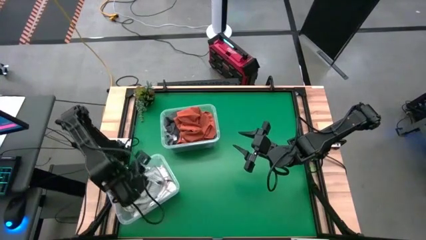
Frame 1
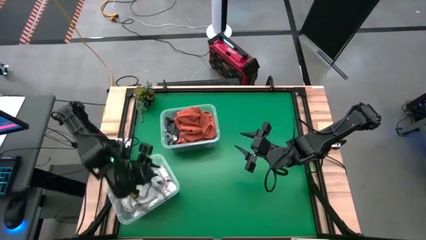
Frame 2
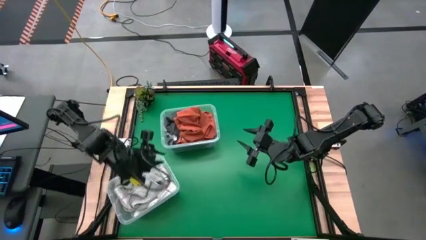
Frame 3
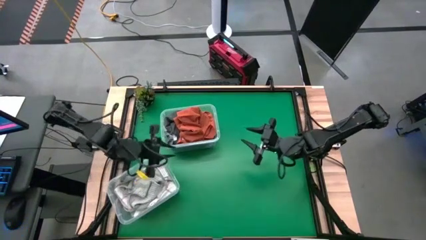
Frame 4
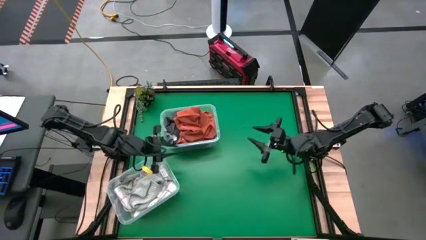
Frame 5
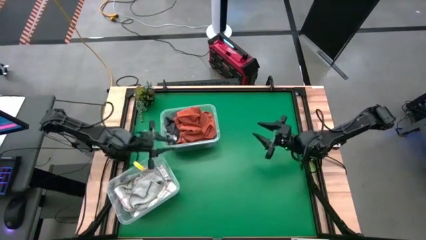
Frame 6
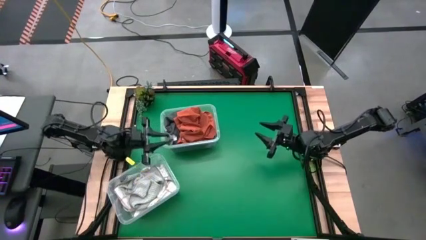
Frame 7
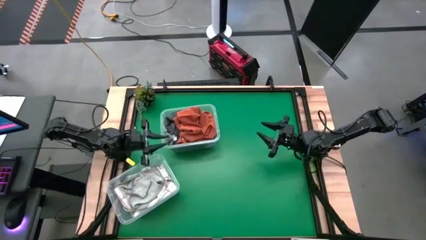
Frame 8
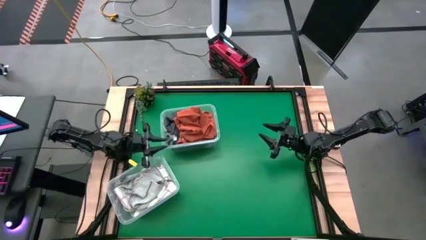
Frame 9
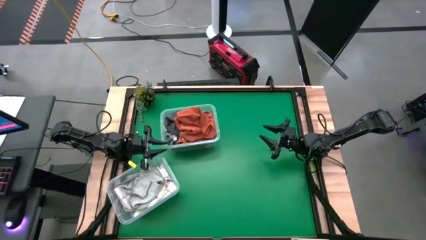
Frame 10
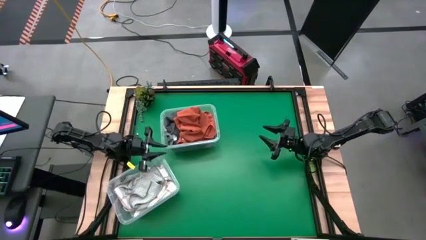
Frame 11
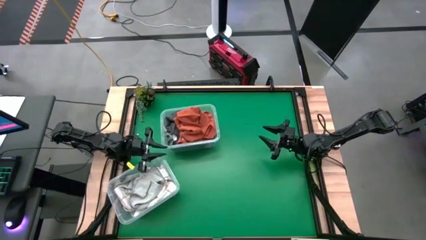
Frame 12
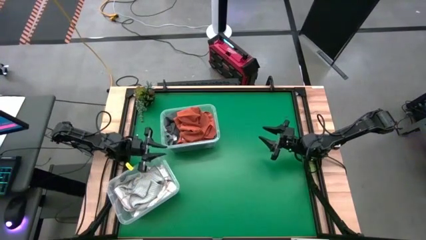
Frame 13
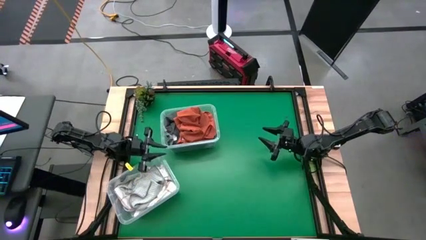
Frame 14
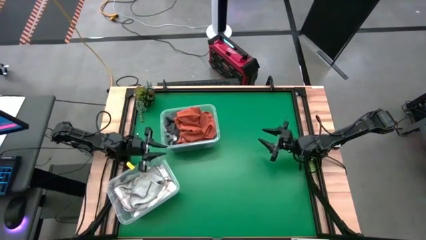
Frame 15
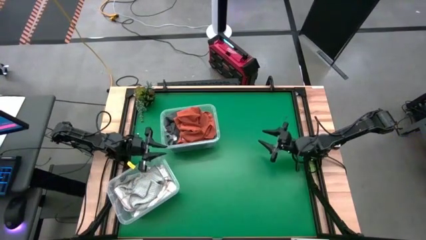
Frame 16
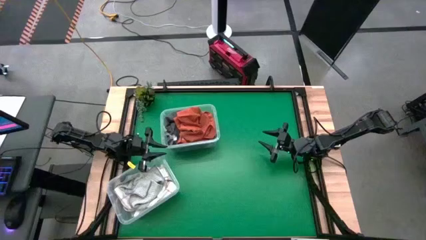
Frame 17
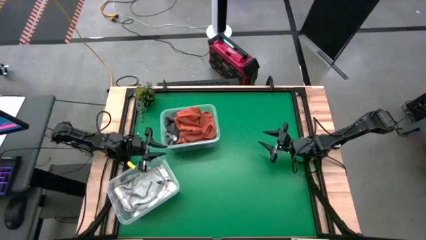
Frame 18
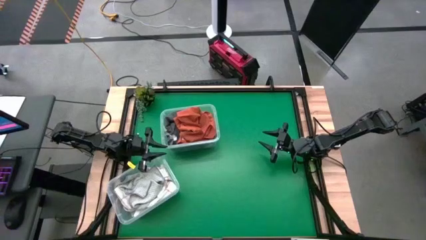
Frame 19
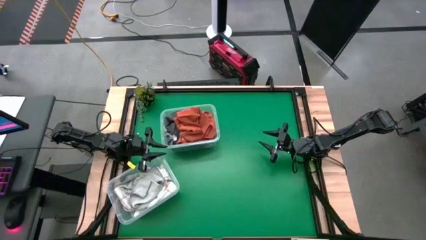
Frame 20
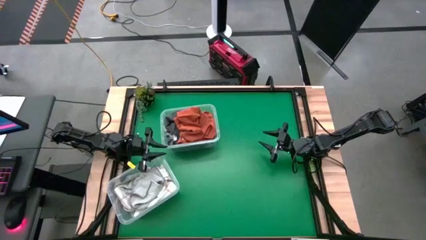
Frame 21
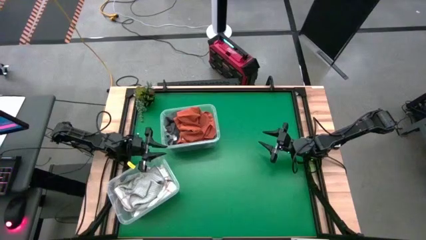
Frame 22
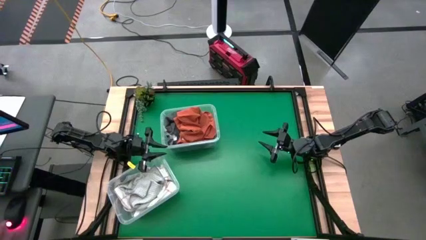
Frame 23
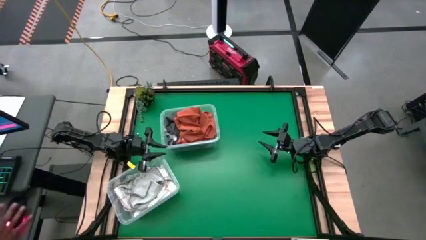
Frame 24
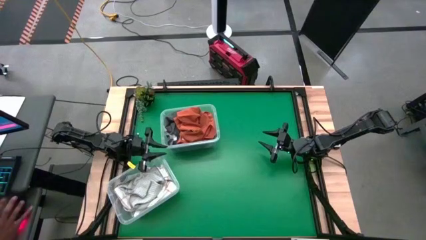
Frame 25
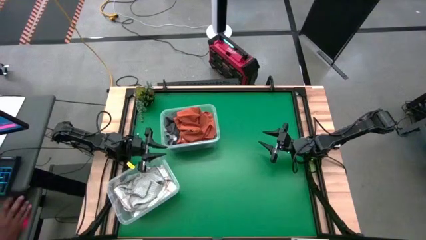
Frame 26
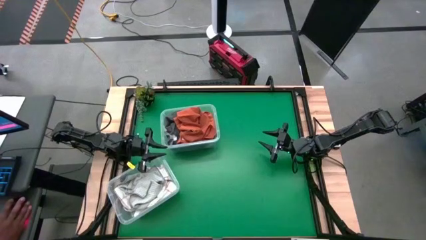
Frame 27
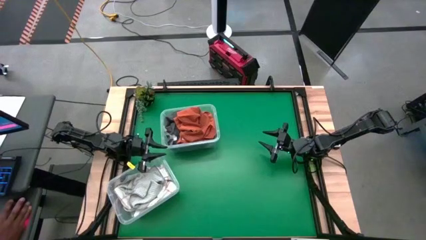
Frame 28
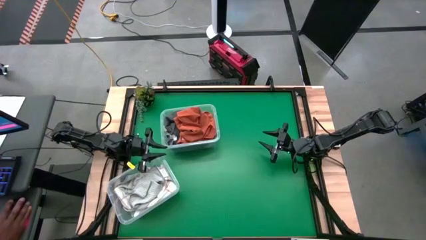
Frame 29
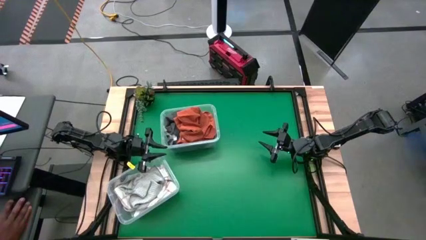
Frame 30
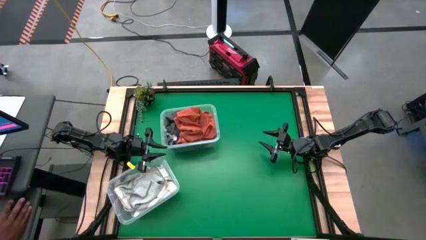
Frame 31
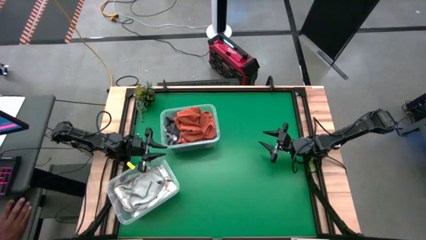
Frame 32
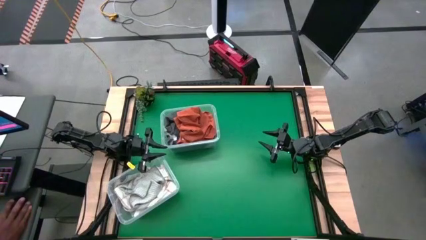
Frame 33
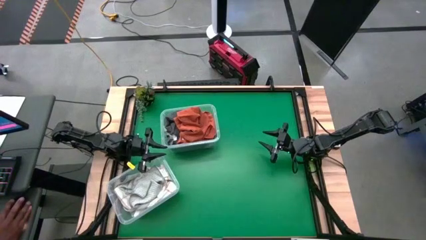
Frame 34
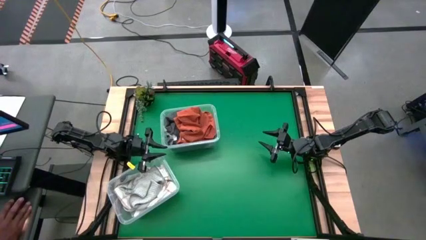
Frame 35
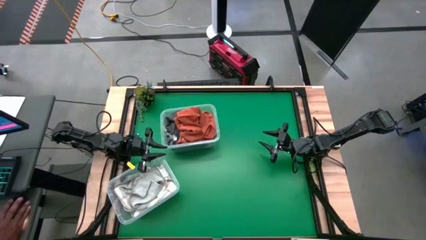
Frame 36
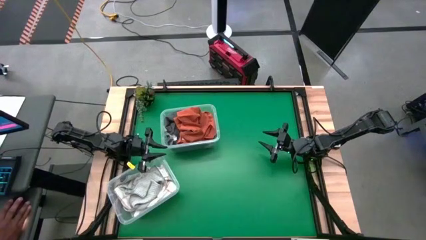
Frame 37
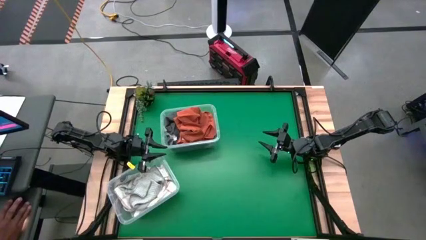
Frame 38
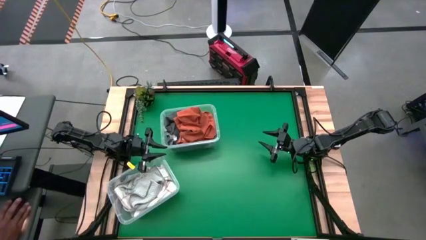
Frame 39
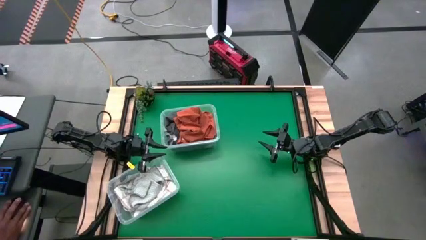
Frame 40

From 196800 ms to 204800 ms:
Task: Sort towels by color in basket
Return to Home Position

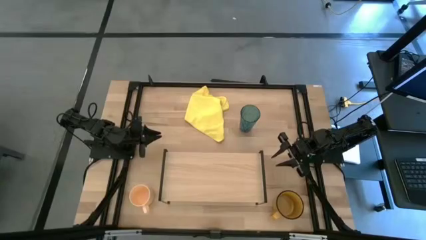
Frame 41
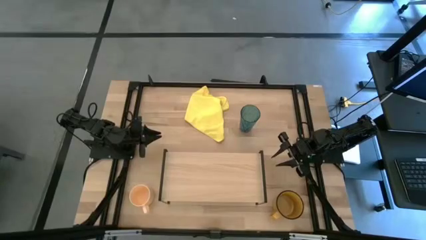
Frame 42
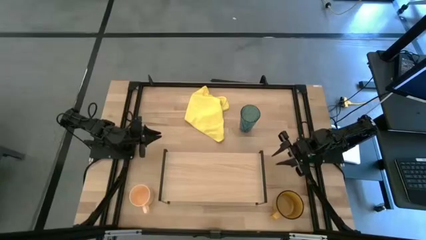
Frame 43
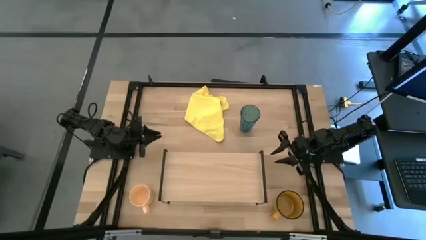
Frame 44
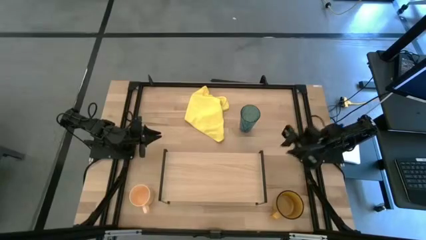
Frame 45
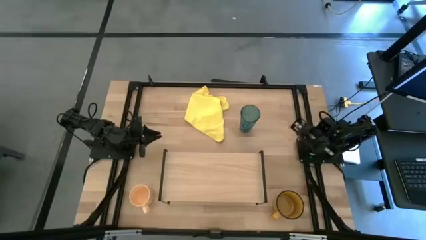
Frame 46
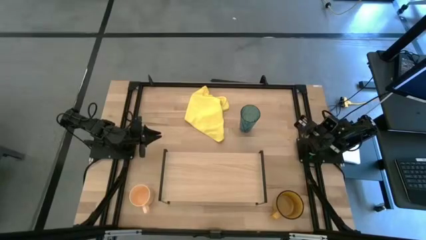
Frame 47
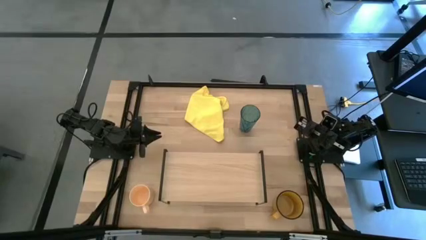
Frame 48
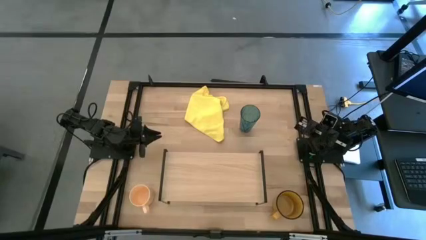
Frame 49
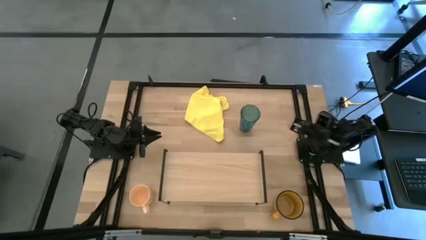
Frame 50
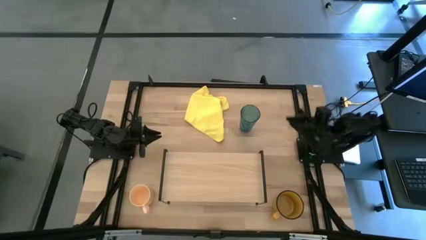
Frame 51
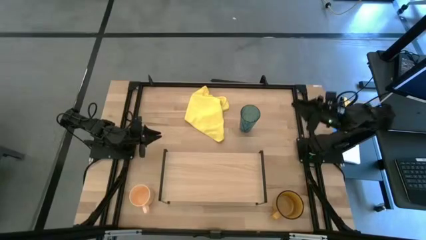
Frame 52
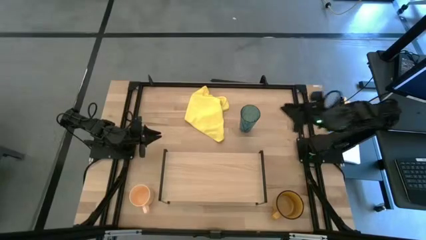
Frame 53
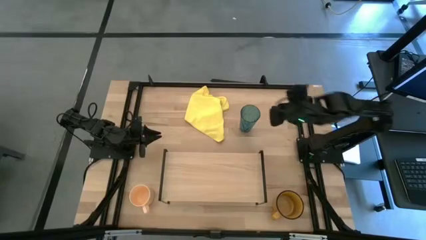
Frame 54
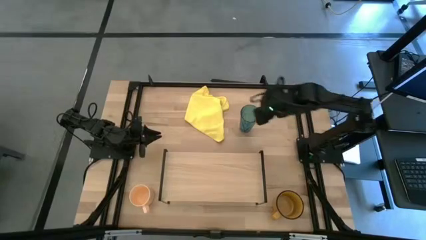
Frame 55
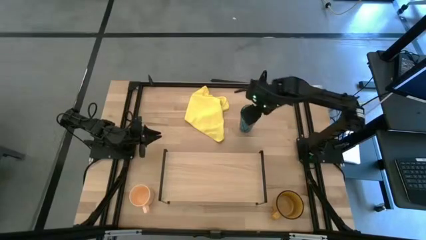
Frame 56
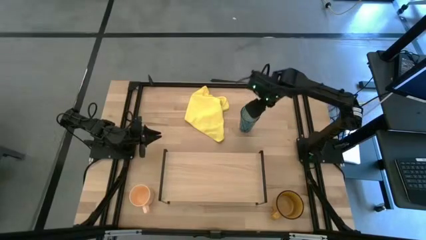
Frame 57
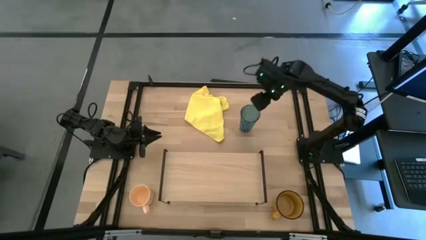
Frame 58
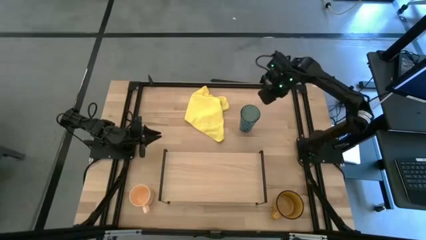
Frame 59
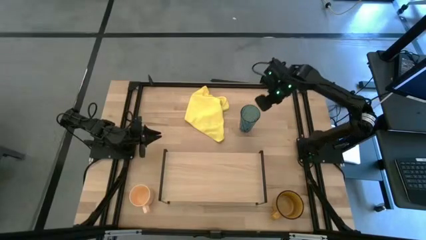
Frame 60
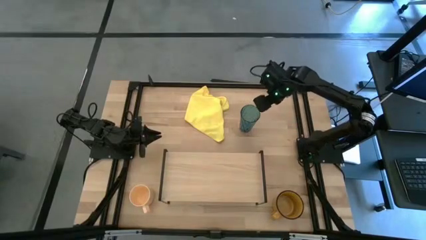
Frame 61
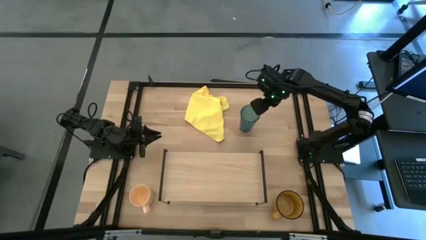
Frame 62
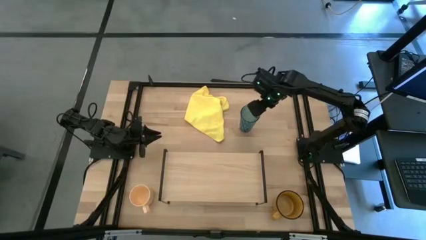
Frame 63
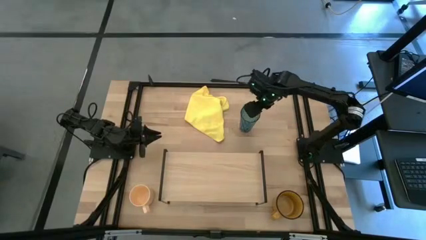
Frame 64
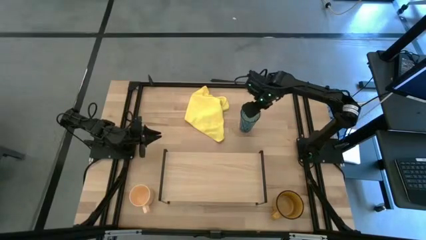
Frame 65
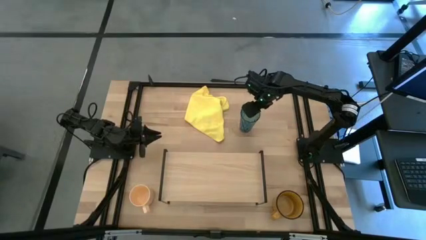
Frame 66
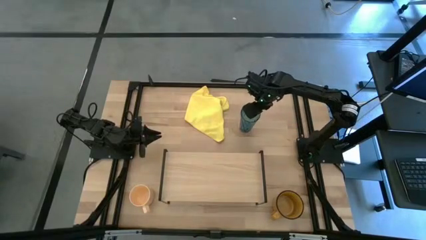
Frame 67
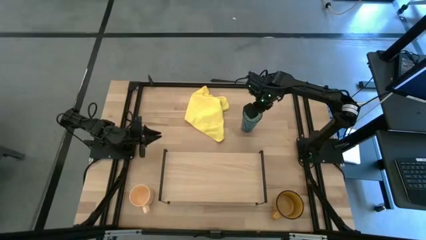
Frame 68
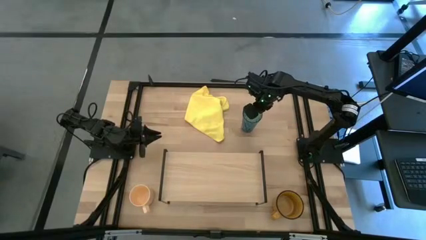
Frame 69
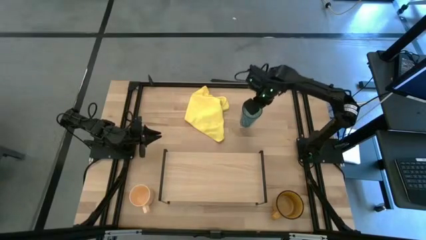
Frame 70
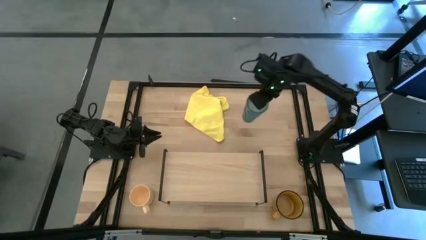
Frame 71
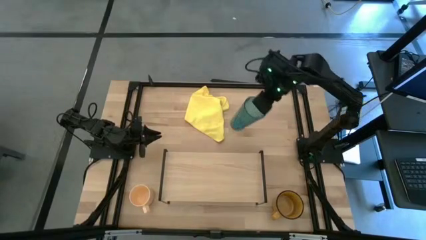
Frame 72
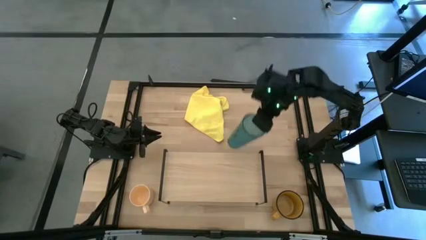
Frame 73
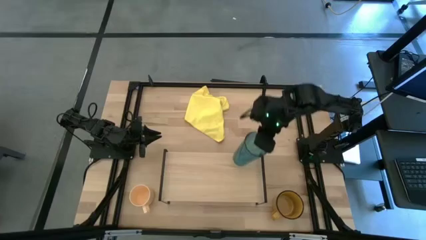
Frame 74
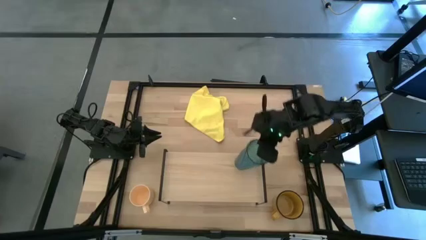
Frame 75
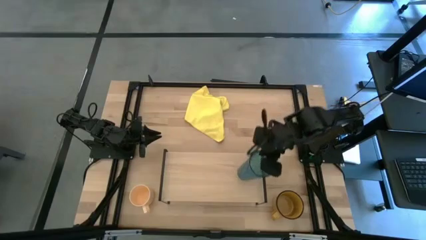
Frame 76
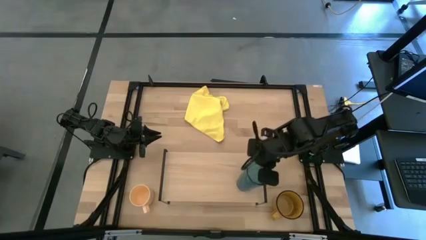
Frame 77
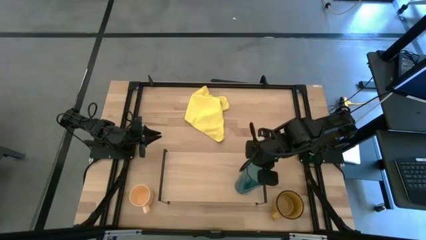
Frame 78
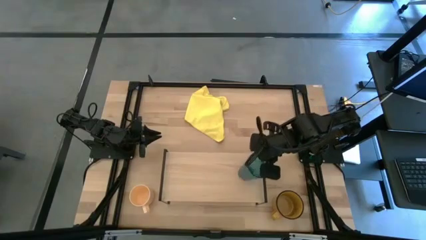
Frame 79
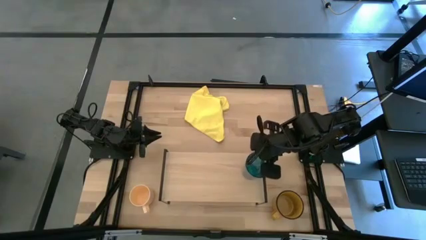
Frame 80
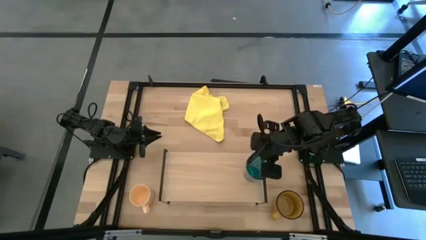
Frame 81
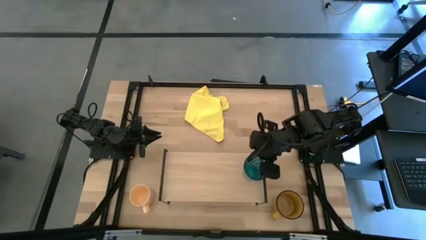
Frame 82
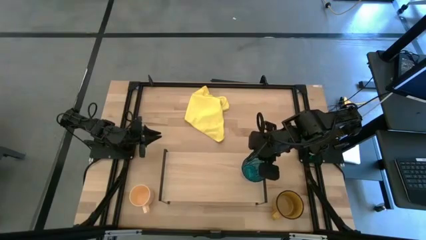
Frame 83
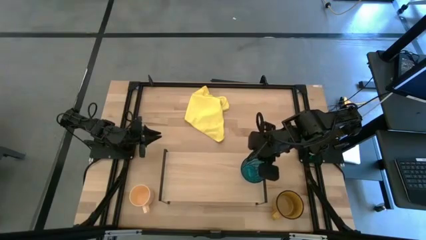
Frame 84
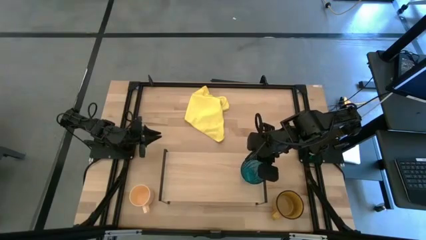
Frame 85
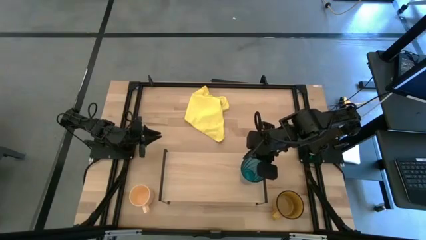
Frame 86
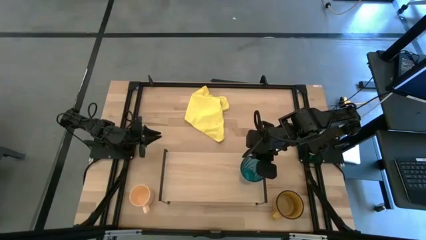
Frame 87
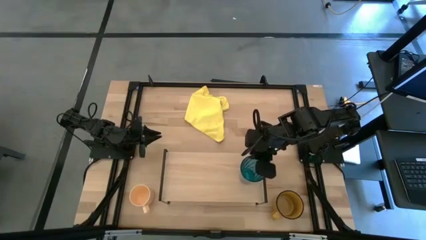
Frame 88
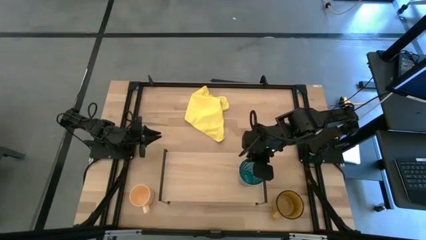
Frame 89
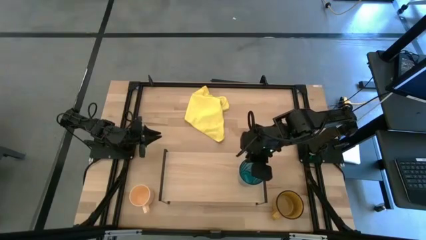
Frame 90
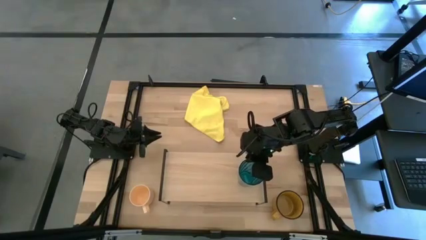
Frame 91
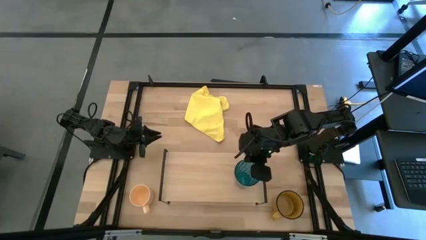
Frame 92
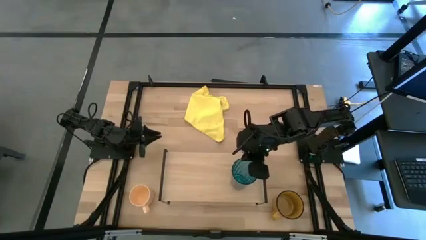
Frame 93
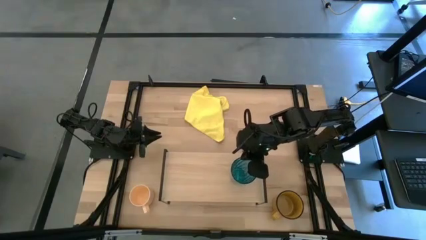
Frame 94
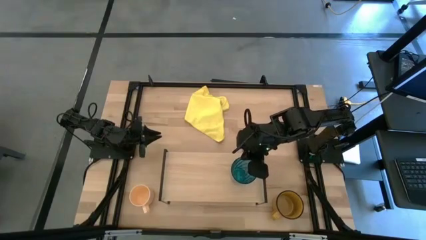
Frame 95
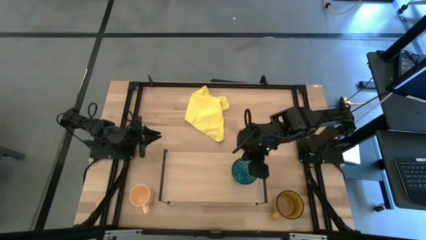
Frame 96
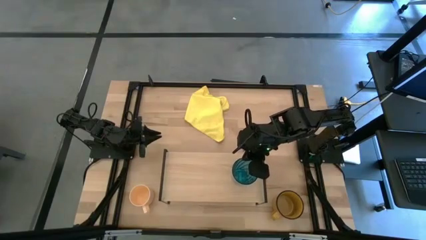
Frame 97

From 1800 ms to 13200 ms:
Task: Stack small to large cups/mugs on shelf
Put the blue glass on the shelf
